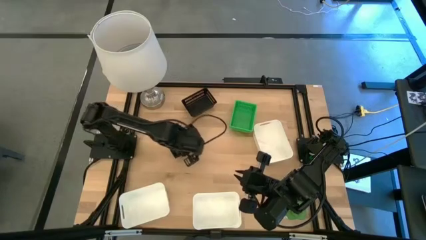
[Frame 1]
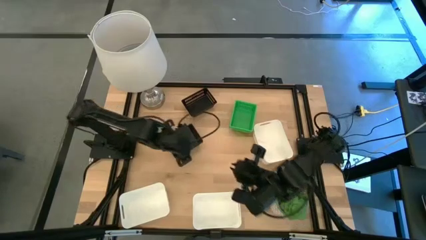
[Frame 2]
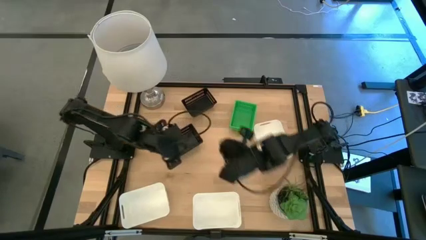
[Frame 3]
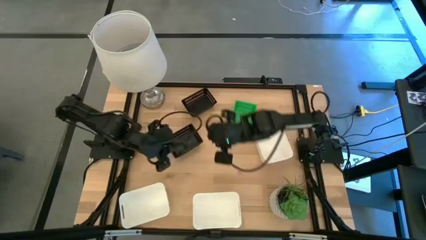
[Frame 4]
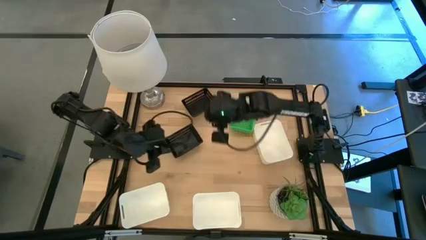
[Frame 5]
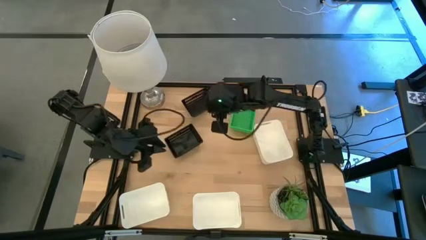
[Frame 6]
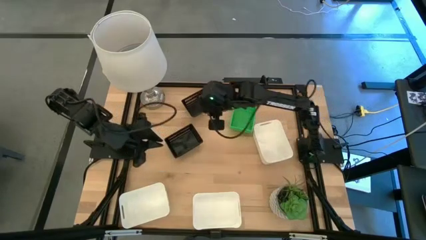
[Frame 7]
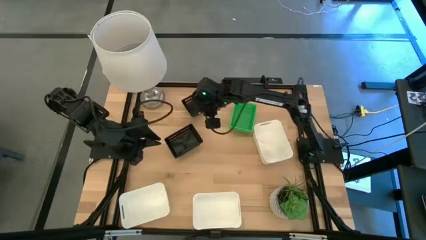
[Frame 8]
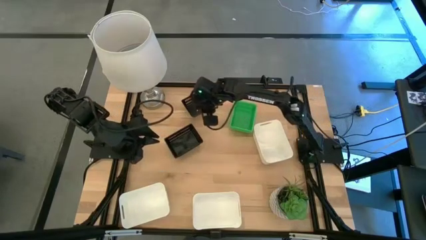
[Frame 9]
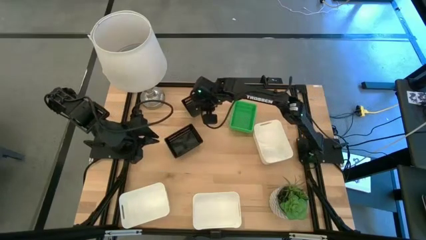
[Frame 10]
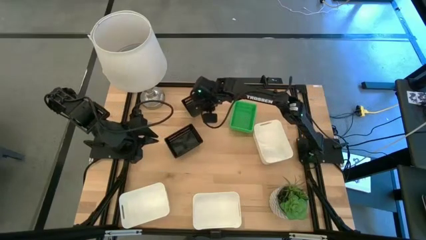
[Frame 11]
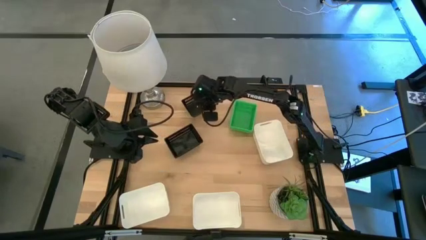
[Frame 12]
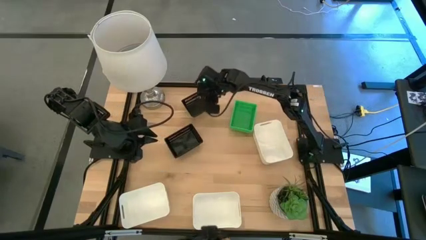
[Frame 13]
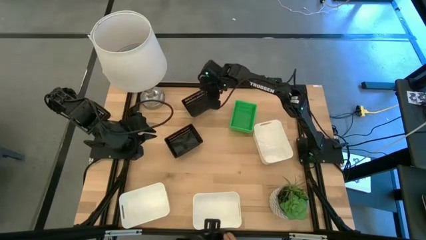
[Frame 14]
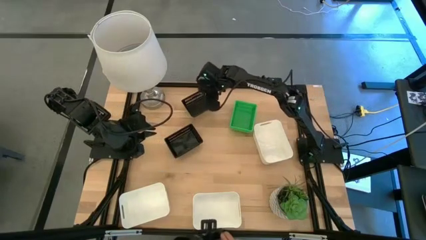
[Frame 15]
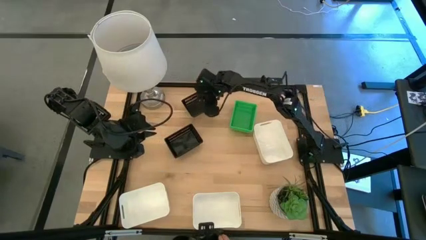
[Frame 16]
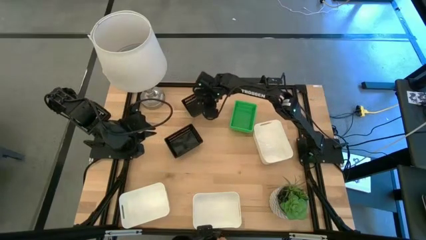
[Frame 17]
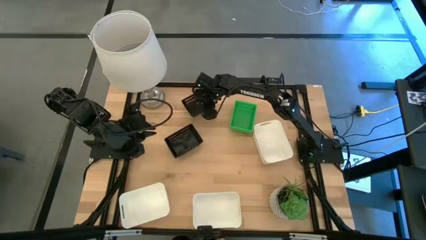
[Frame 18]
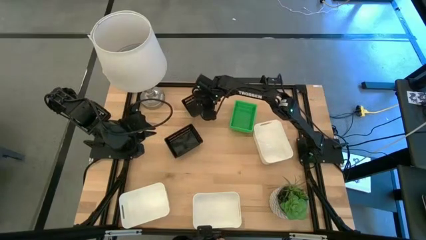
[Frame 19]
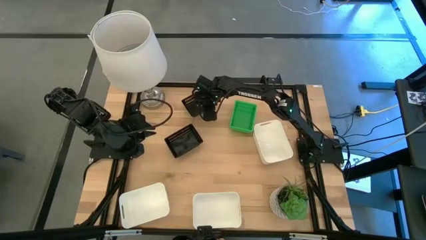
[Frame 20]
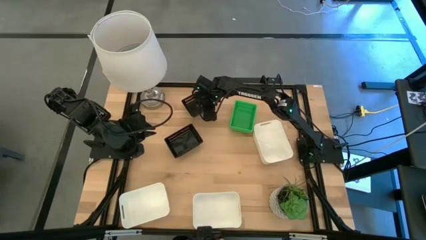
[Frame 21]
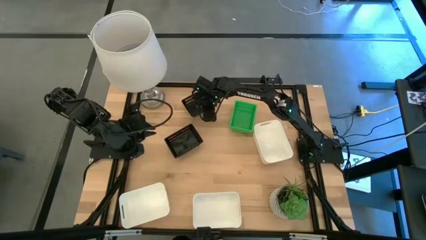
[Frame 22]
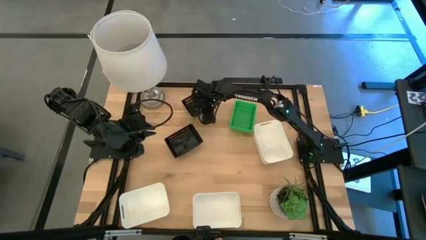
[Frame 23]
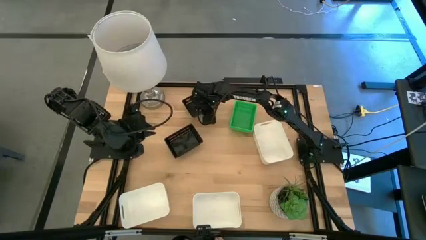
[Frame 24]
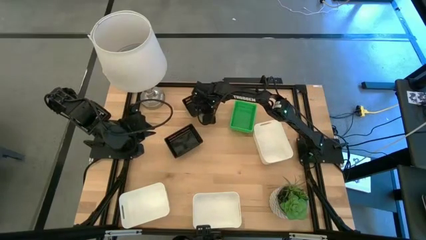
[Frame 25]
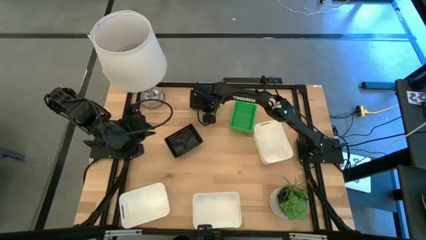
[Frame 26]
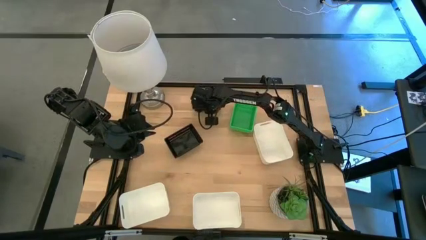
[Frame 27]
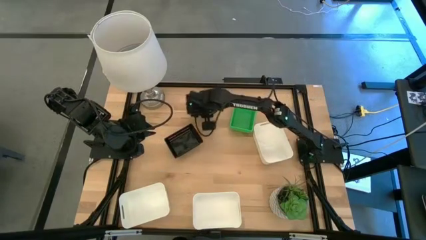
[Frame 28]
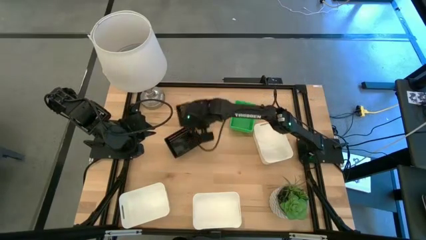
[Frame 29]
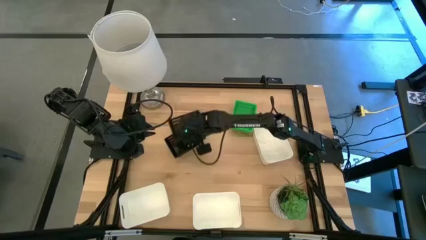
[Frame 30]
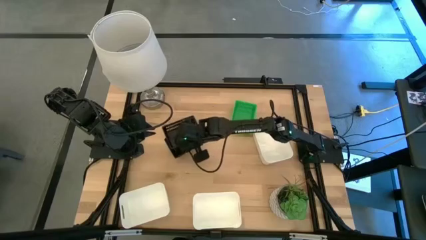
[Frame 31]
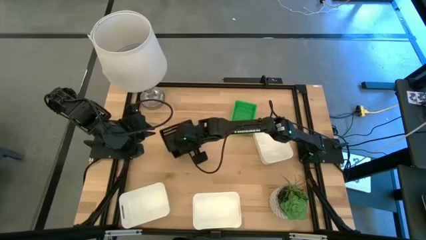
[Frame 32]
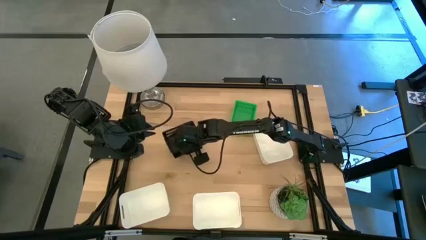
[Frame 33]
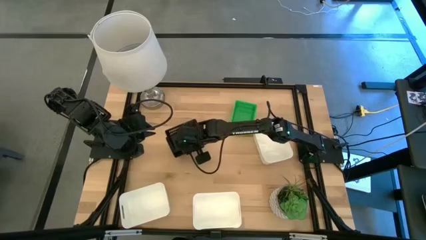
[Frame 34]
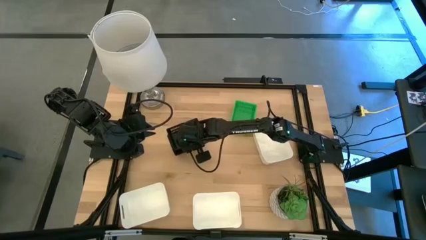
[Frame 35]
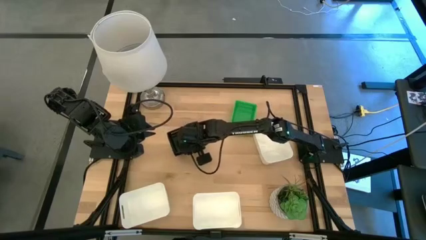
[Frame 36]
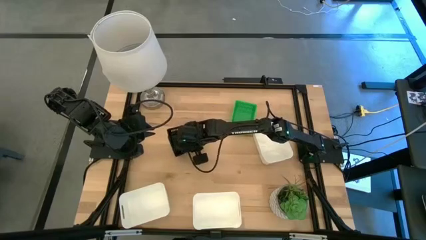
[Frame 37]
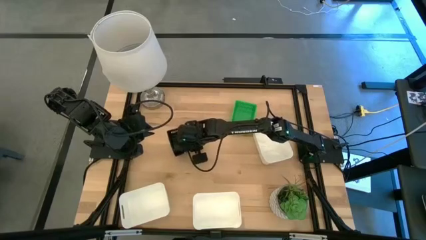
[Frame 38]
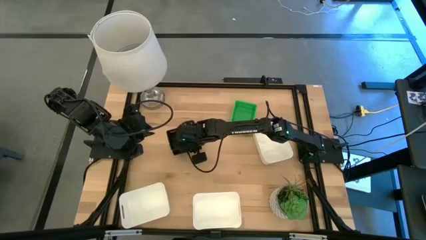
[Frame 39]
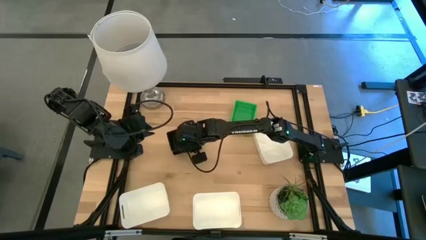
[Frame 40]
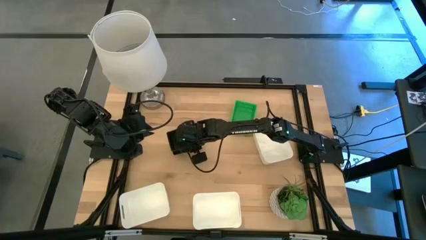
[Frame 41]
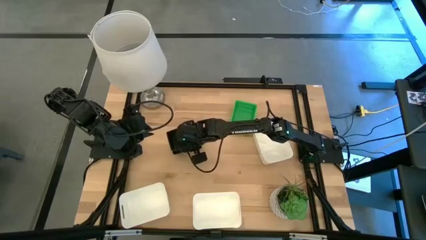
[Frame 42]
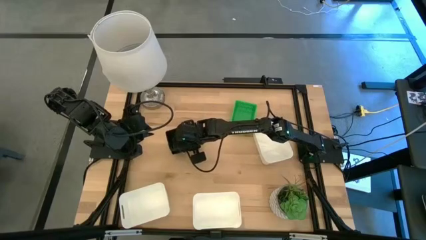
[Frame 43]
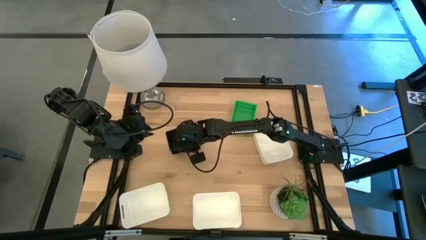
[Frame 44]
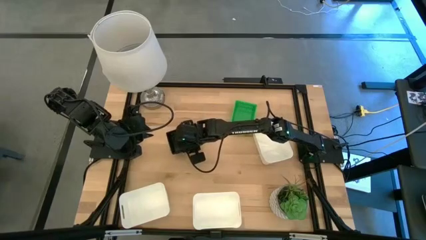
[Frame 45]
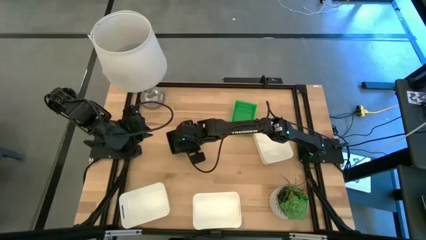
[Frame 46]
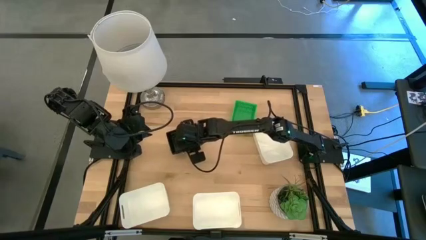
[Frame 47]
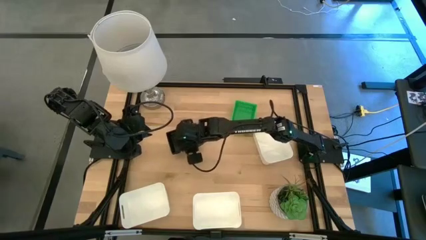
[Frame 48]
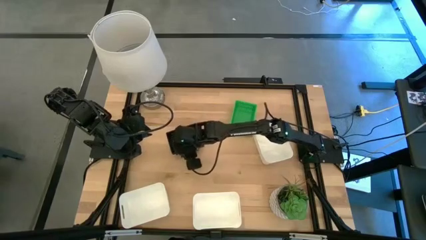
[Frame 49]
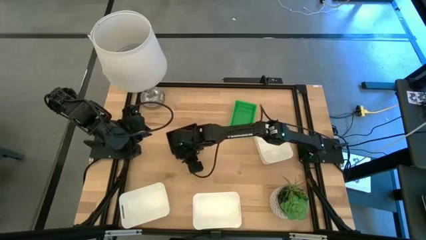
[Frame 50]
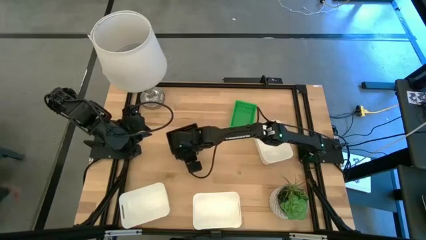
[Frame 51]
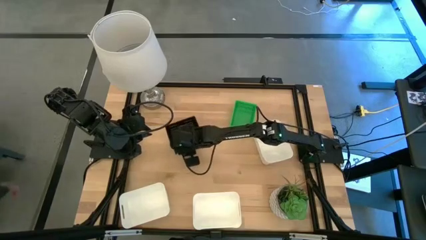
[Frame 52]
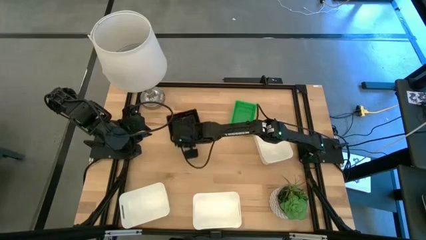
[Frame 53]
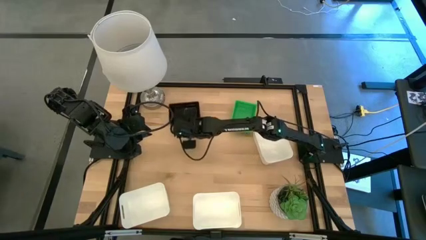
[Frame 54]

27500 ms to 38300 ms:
Stack the top black bin on top of the bottom black bin
